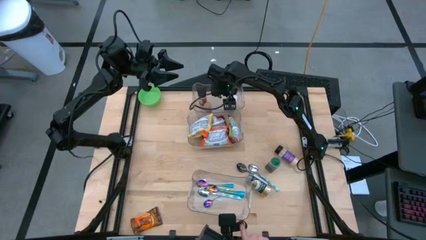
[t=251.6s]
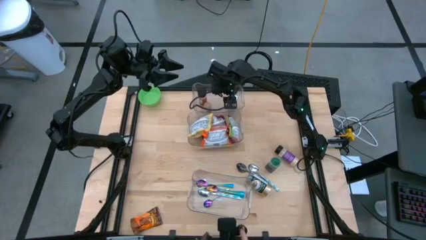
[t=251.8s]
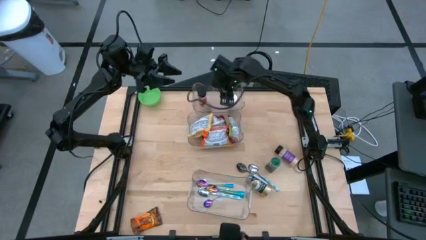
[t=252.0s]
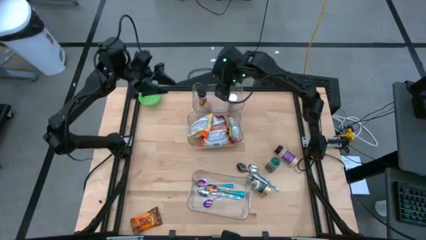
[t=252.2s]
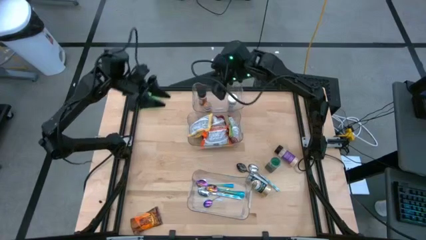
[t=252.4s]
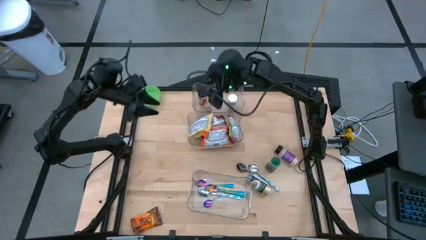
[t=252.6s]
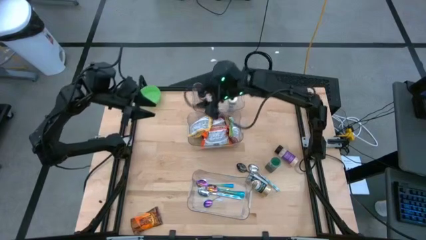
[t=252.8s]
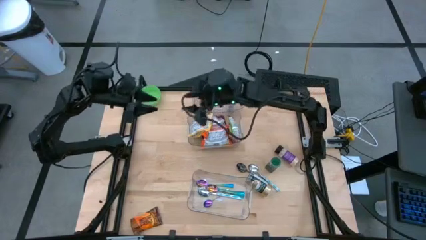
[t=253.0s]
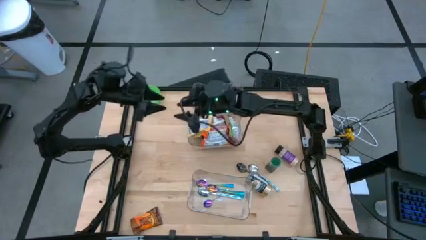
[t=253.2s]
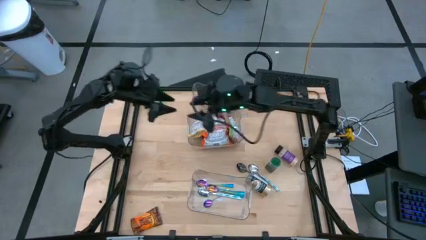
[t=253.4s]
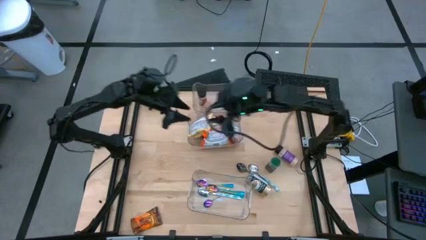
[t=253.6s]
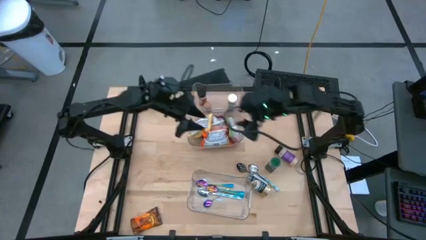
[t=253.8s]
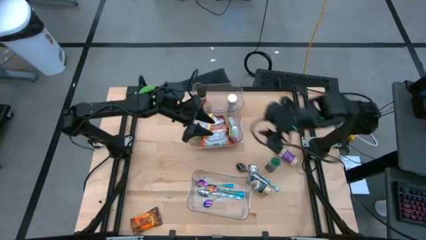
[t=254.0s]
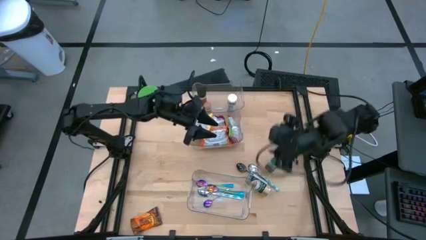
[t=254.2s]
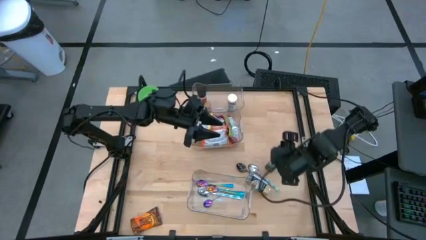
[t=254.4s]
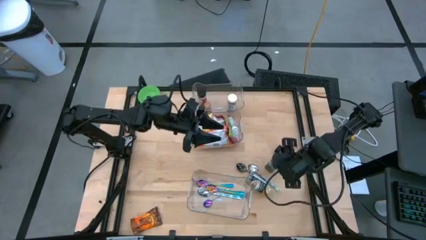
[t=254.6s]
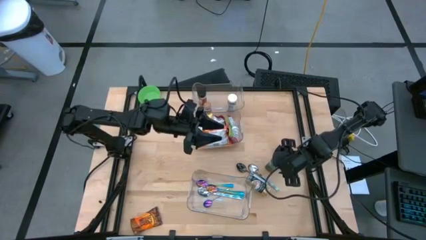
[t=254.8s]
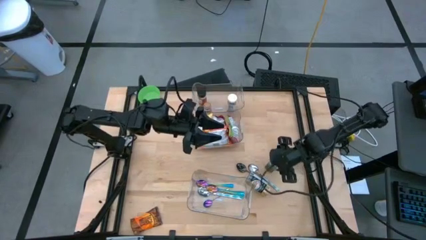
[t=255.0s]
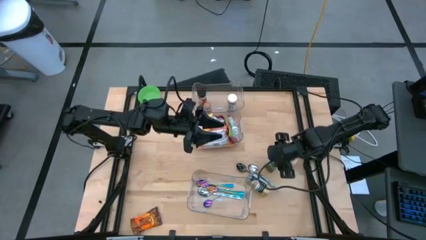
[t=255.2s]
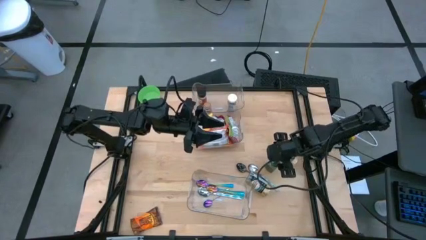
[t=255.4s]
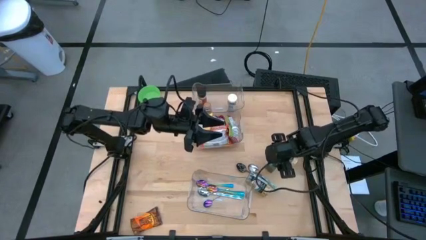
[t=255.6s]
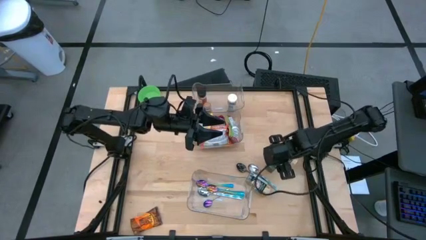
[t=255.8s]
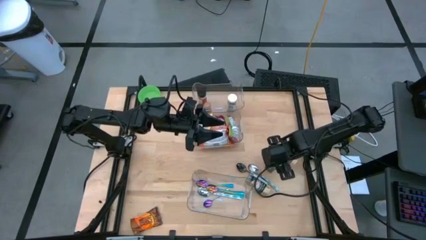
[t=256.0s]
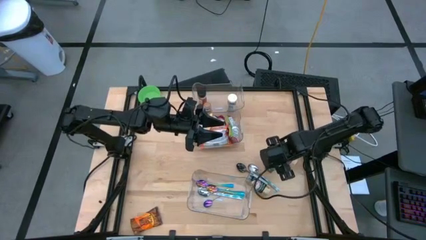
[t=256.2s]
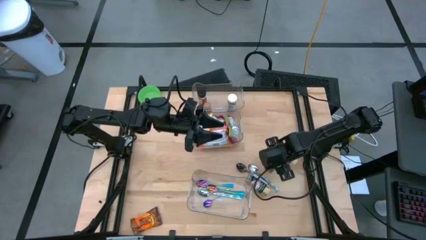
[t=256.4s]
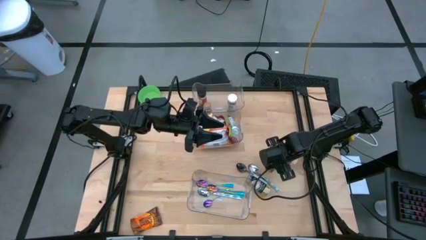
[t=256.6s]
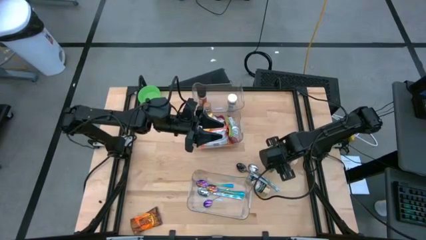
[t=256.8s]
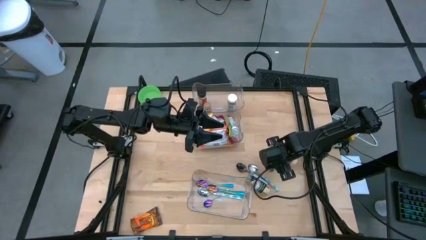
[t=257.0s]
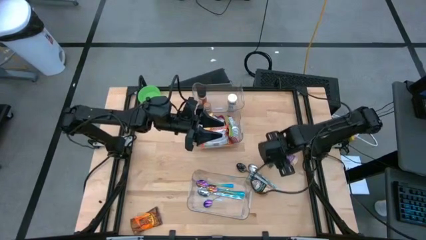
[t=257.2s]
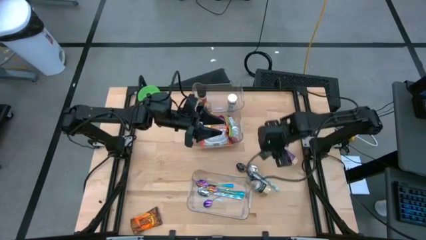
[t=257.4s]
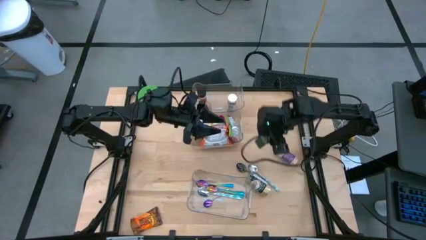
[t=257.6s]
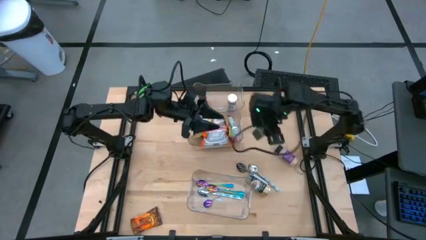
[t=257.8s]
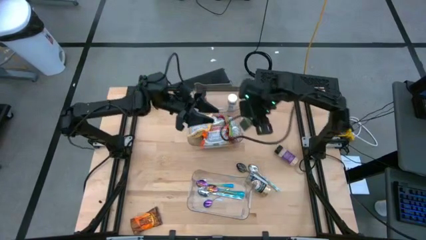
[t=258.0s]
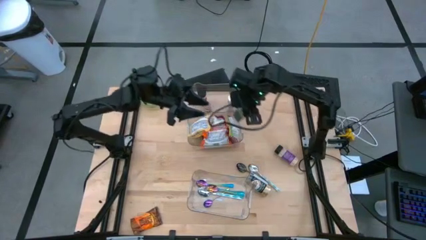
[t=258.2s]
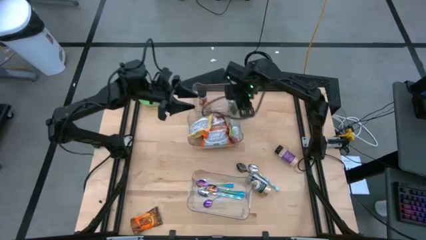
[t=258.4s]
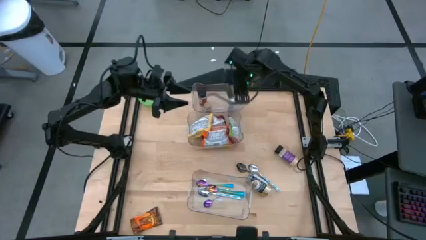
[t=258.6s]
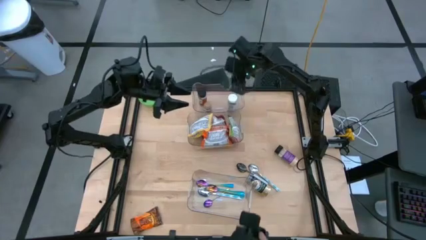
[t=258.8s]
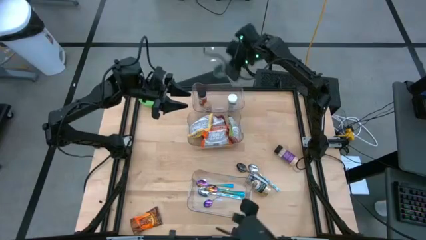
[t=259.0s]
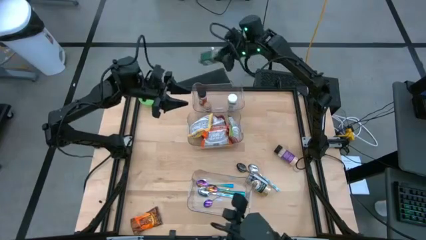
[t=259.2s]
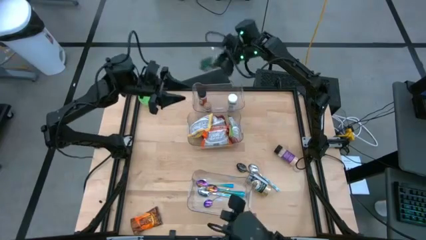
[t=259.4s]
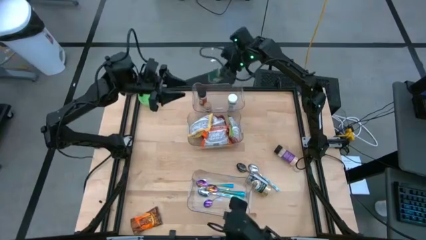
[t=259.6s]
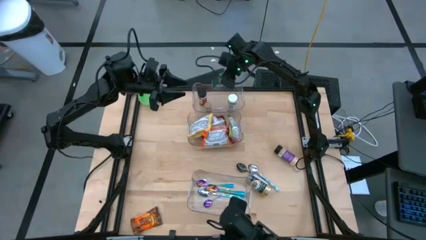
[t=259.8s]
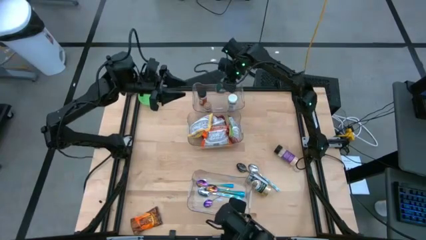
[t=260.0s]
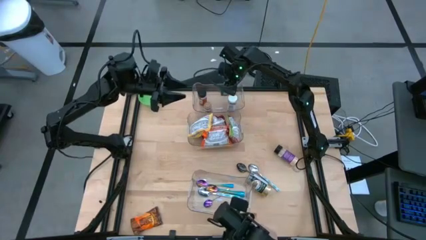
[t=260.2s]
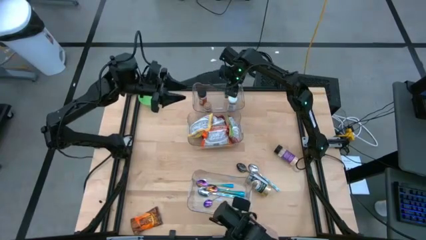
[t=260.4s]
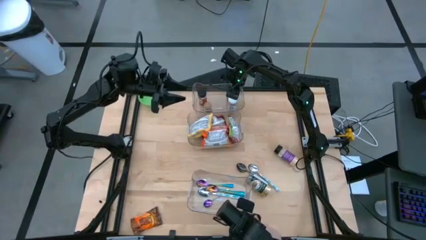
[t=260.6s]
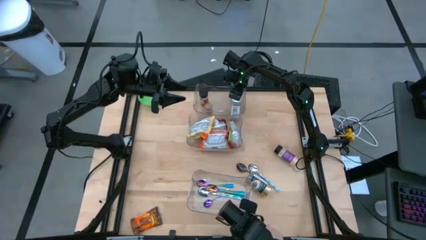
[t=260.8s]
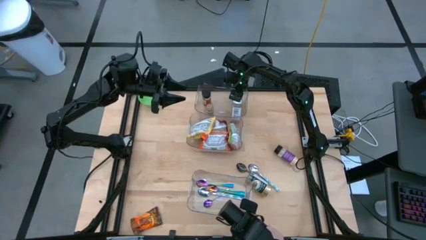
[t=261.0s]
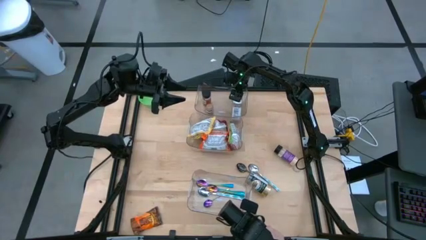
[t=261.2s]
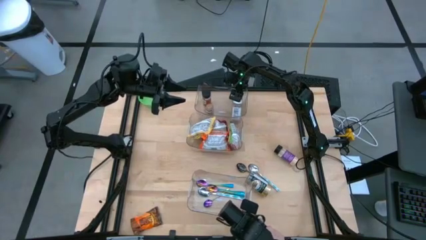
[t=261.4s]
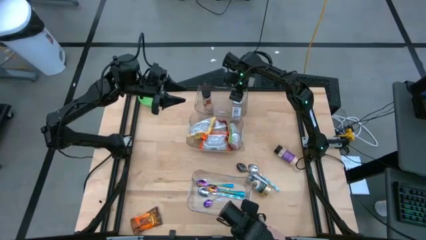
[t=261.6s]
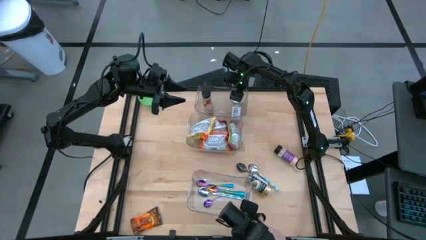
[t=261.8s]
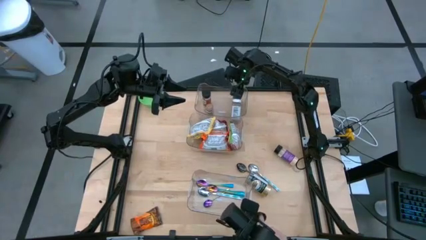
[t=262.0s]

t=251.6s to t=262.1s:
Task: Pick & Place Food Item
Put the green seasoning bottle into the top transparent bin

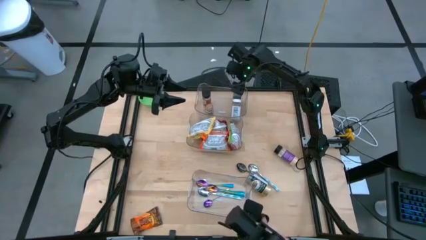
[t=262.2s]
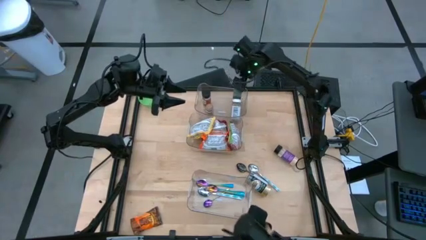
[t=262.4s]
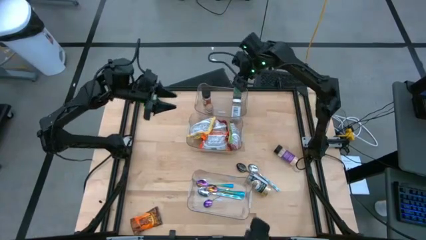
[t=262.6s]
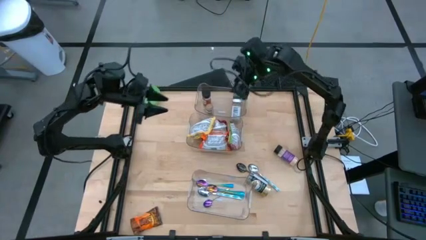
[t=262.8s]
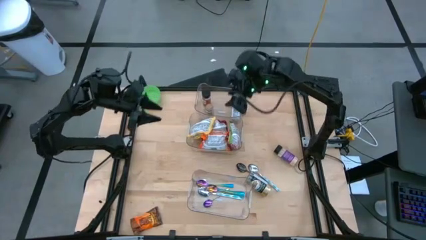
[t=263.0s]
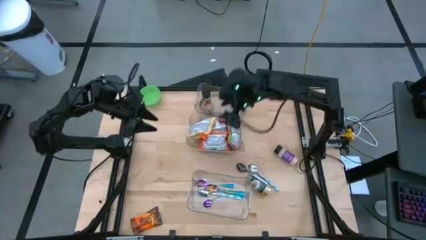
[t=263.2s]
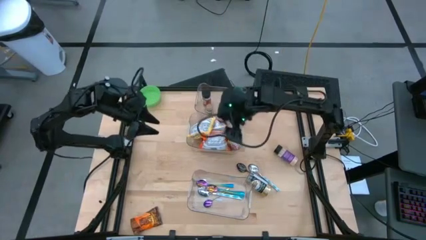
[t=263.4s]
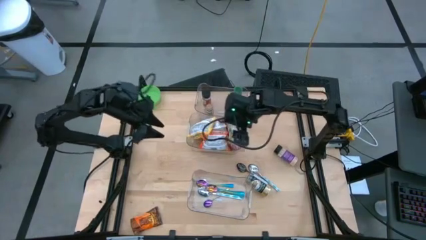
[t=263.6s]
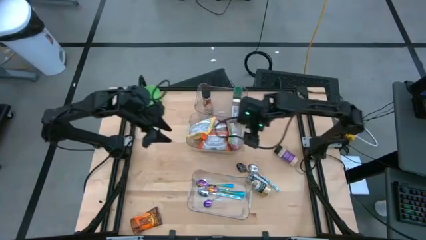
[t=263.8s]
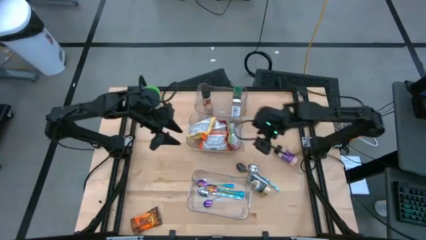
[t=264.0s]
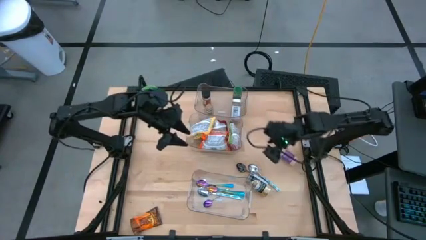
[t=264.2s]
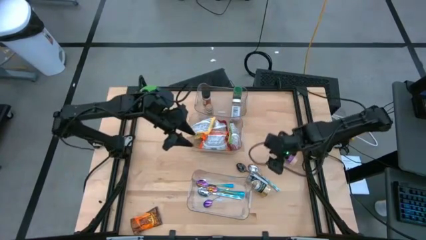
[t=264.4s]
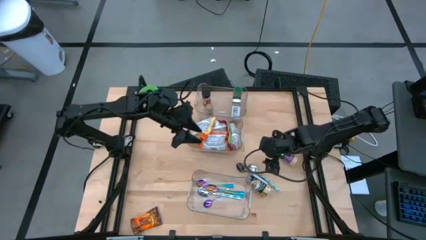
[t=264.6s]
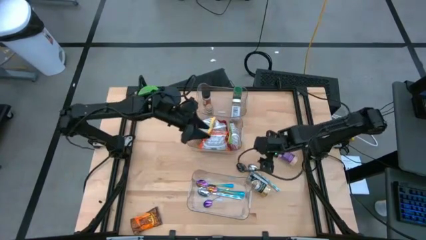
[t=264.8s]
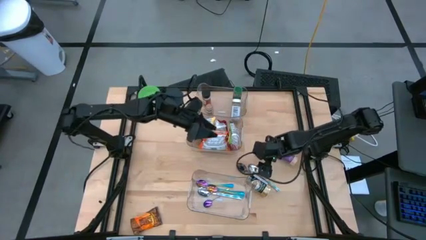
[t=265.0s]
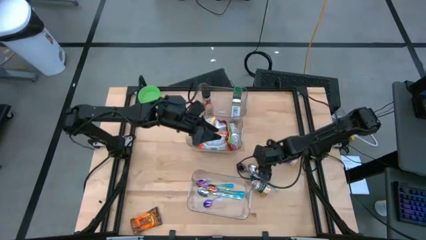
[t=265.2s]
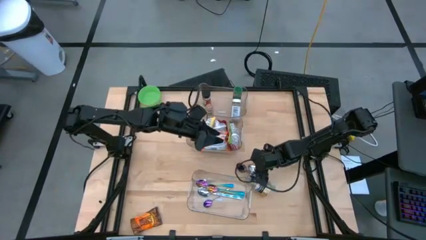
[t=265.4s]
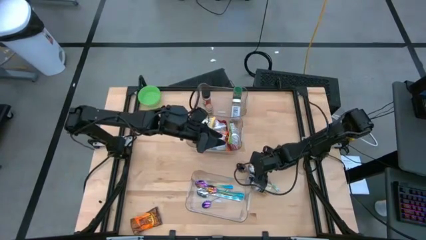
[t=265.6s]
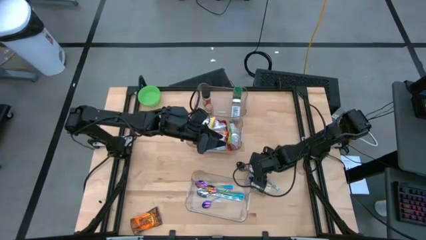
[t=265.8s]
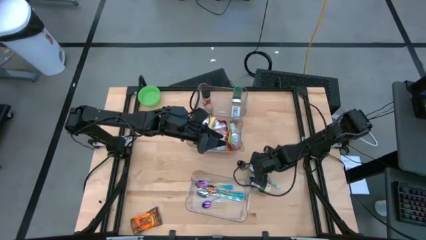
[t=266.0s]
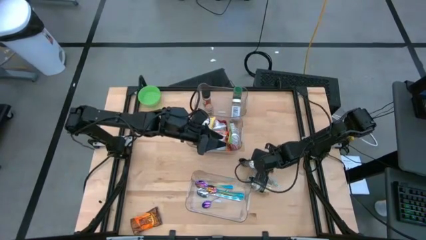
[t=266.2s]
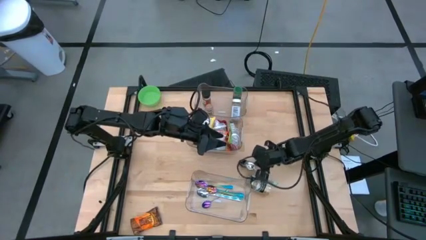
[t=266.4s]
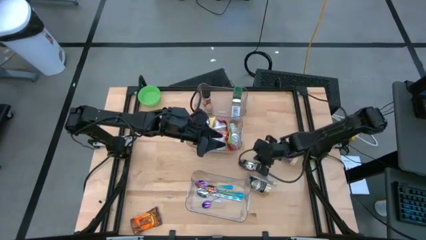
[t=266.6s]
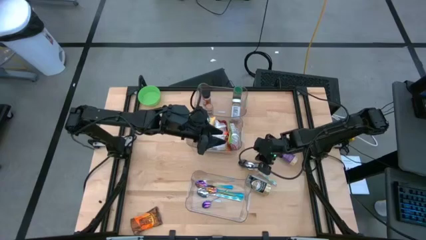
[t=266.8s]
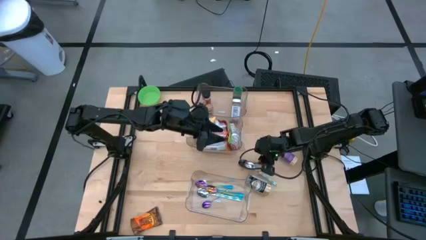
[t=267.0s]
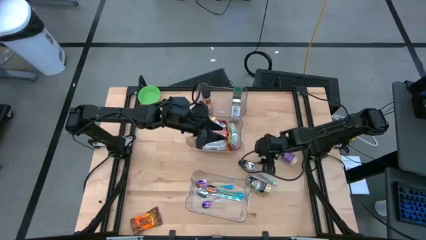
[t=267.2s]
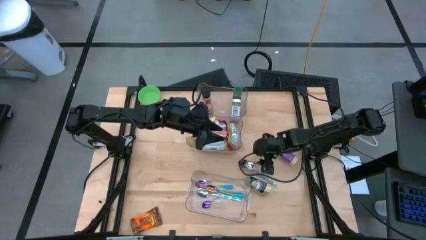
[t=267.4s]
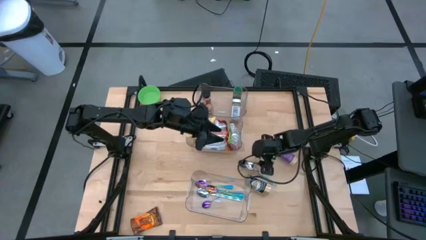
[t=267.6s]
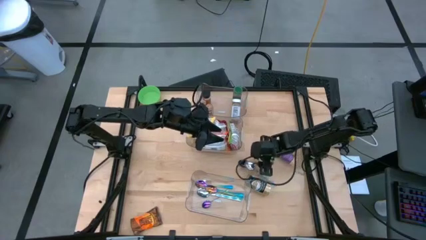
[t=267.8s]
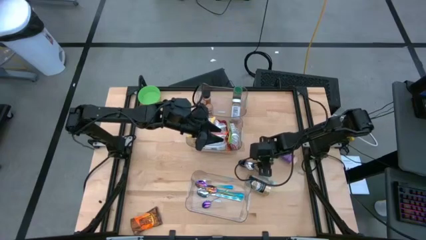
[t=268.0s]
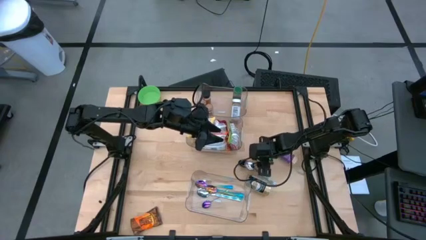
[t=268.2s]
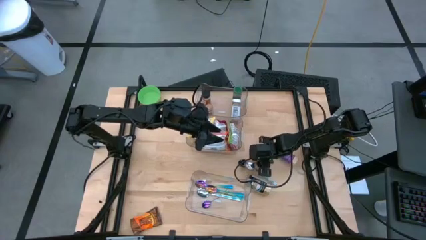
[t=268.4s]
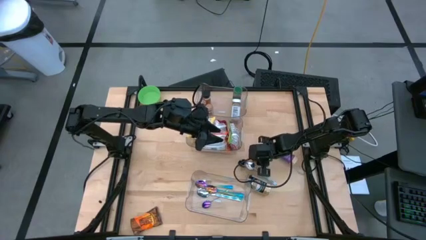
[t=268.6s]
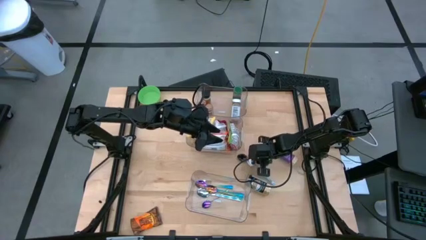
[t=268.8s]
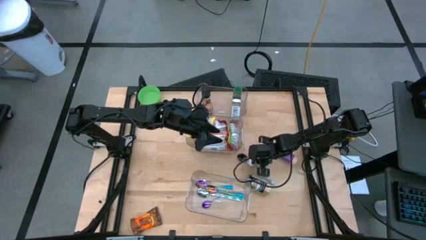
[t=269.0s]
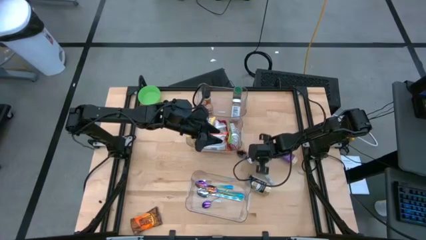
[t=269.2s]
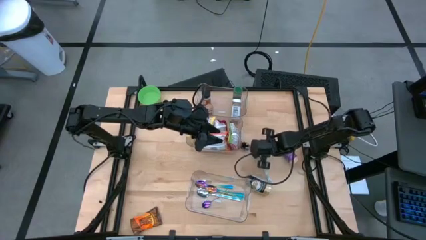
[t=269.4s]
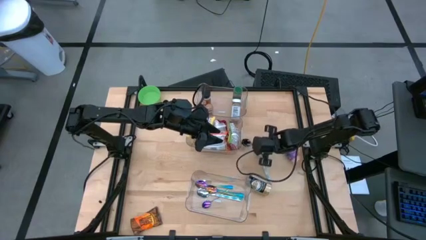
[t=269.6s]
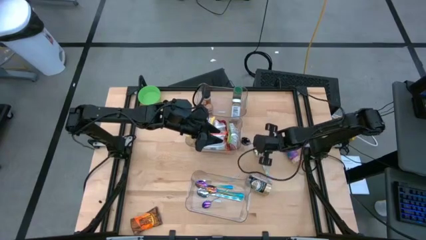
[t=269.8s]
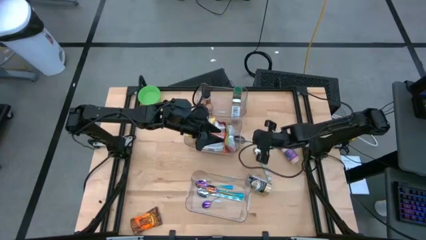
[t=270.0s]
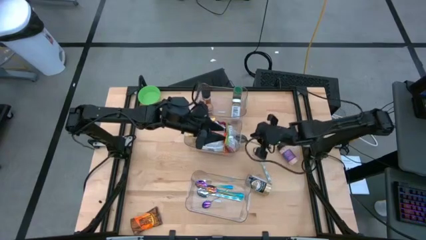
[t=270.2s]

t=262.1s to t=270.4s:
Put the black spoon into the bottom transparent bin
